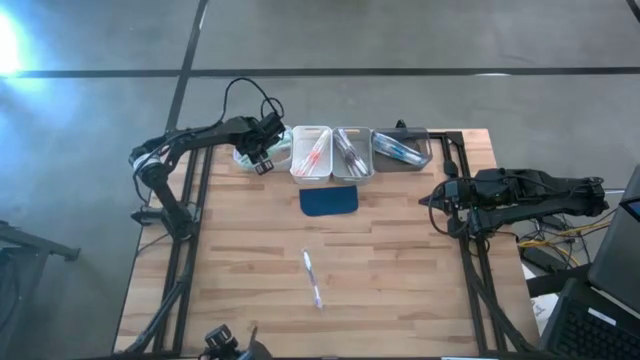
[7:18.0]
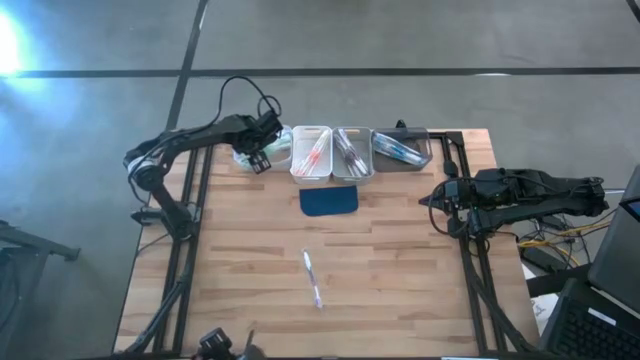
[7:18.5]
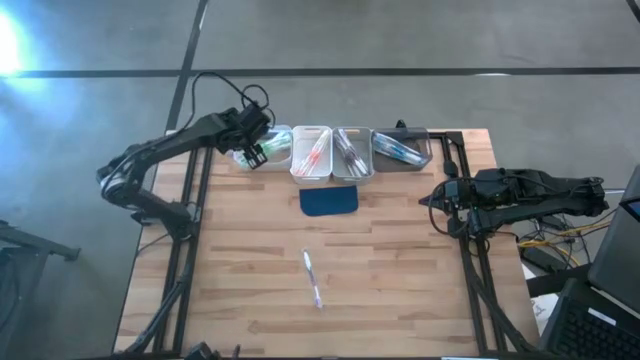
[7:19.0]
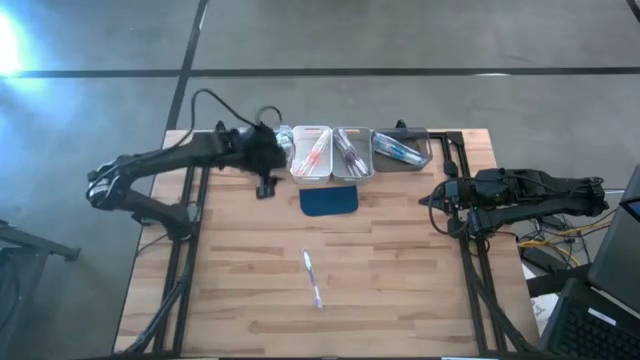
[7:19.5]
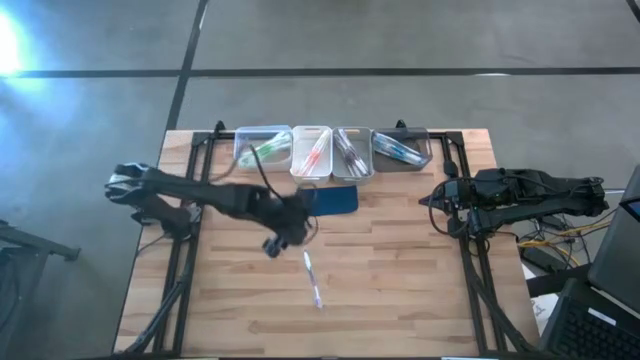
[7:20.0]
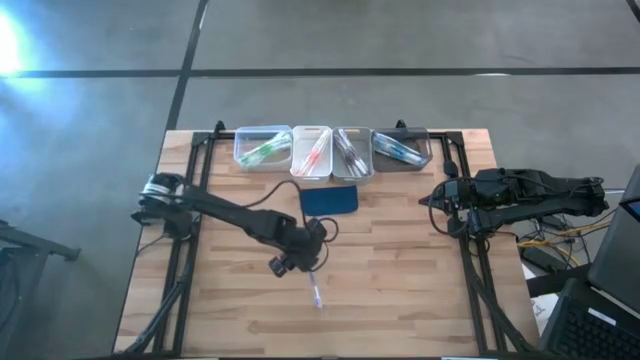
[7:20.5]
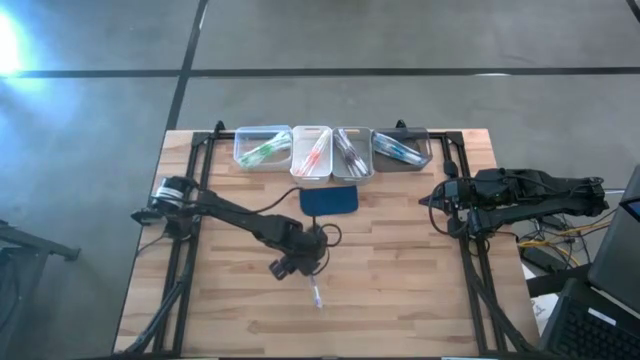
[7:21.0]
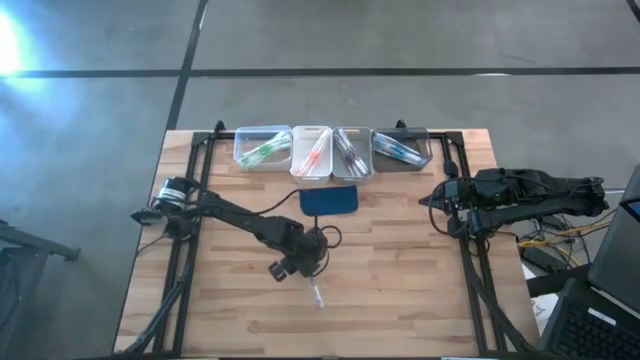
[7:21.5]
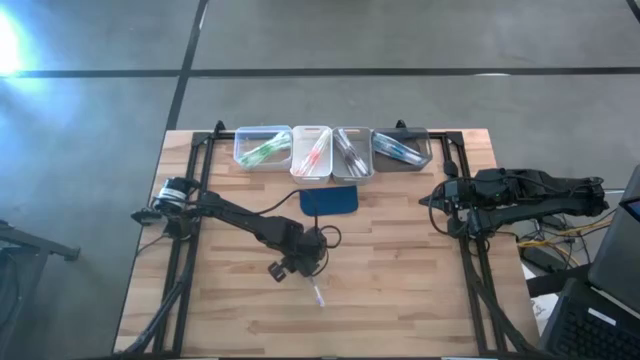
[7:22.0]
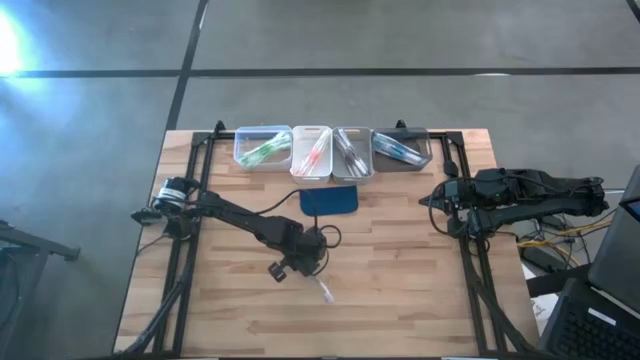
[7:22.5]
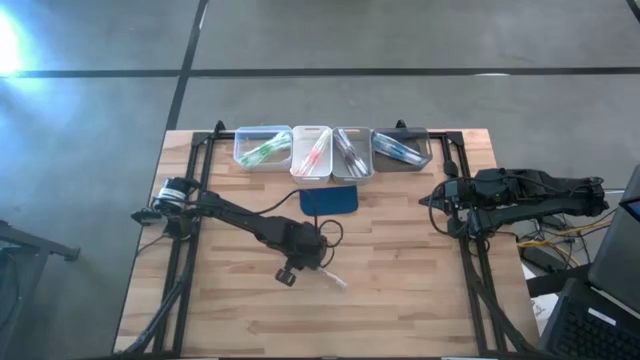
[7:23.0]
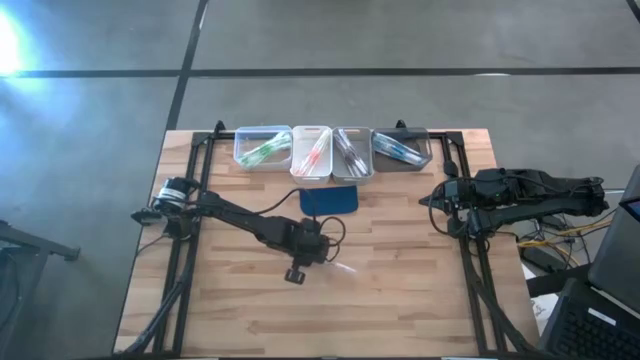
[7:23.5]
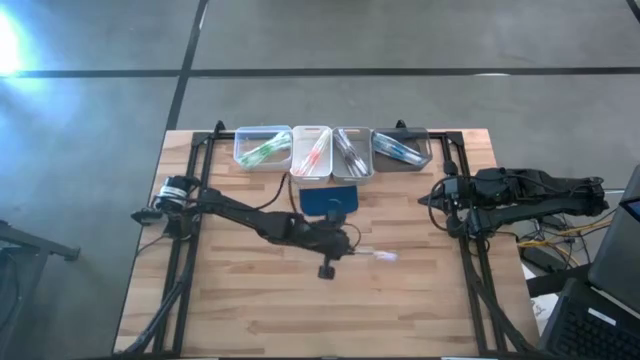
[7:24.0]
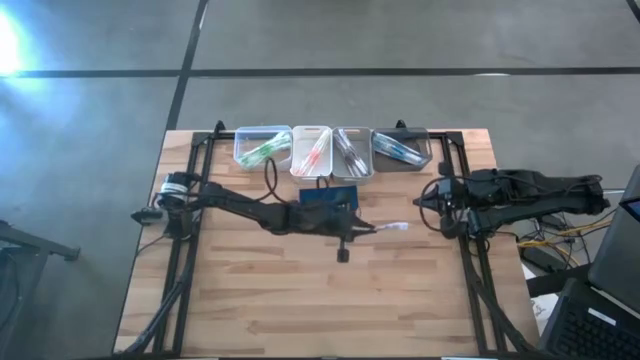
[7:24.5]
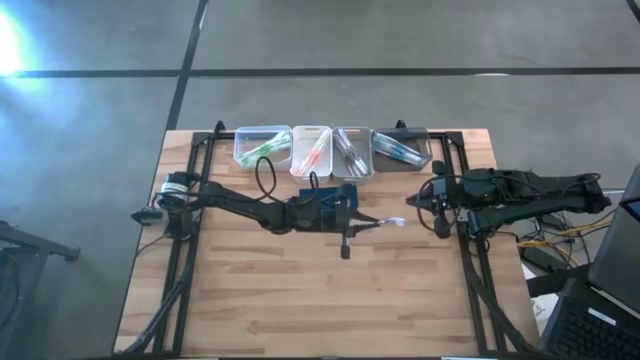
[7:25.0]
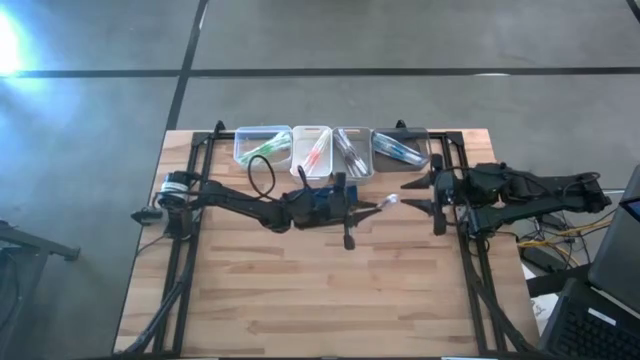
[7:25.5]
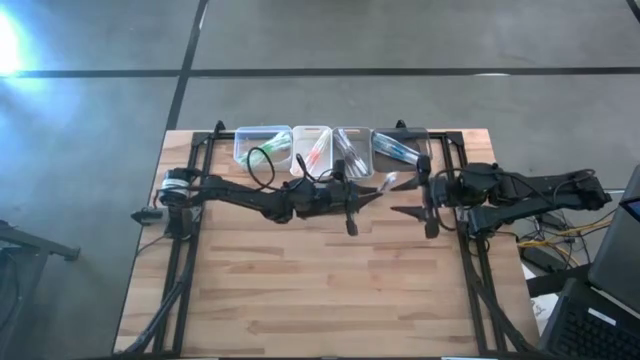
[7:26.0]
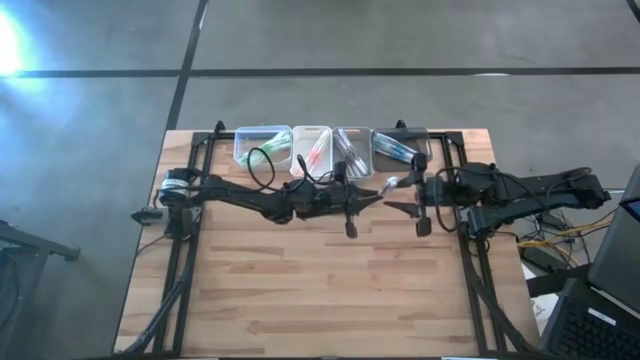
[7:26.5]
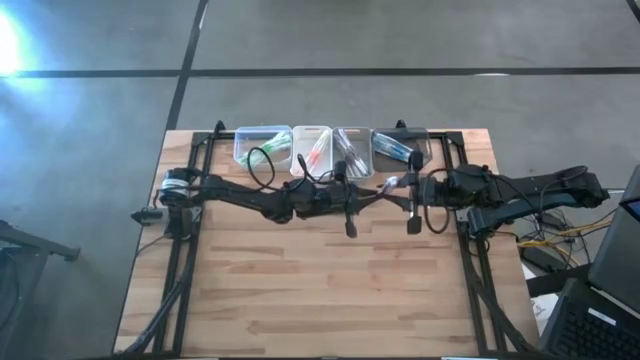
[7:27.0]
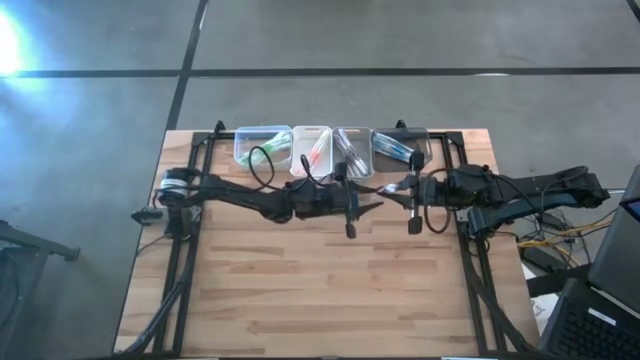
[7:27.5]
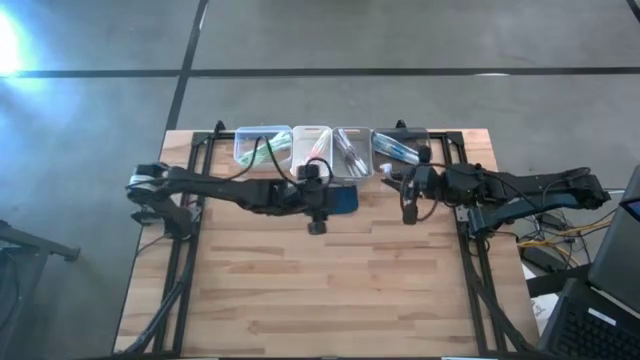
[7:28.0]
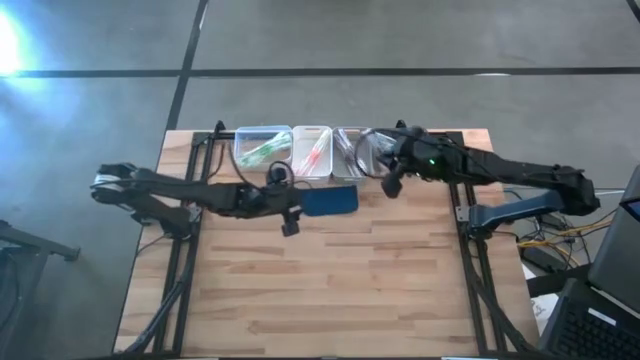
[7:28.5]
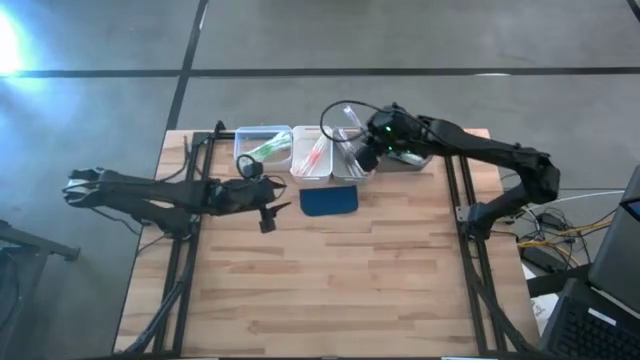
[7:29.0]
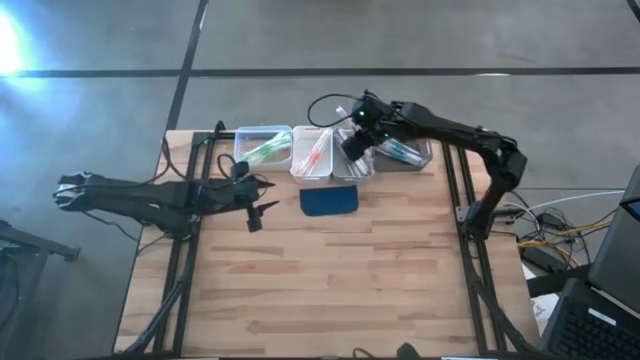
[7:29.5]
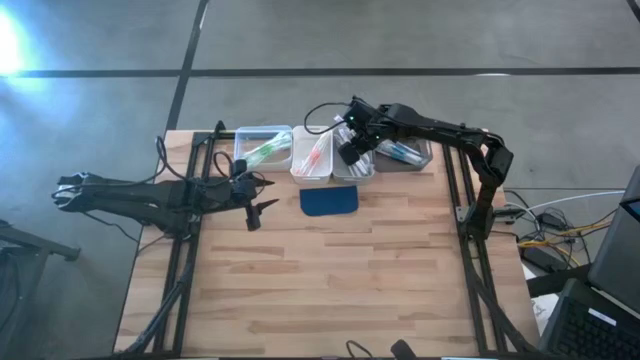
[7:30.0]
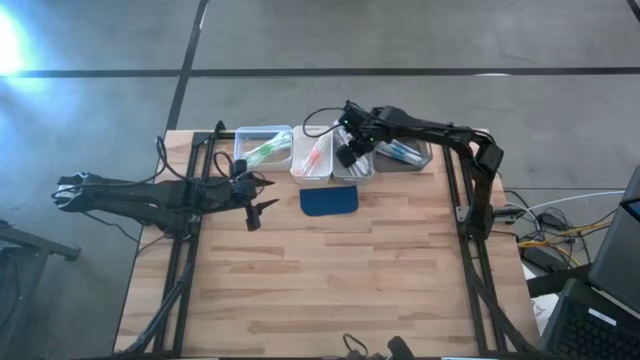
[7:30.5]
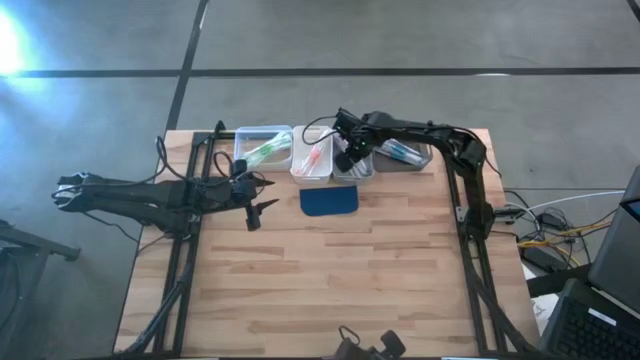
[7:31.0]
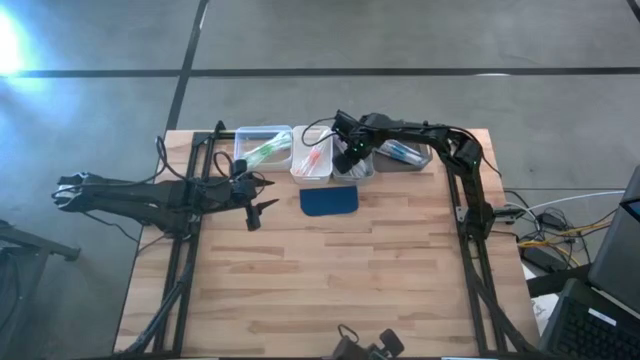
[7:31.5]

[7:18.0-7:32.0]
Task: Pick & Place Toothbrushes
Put the violet toothbrush into the gray bin

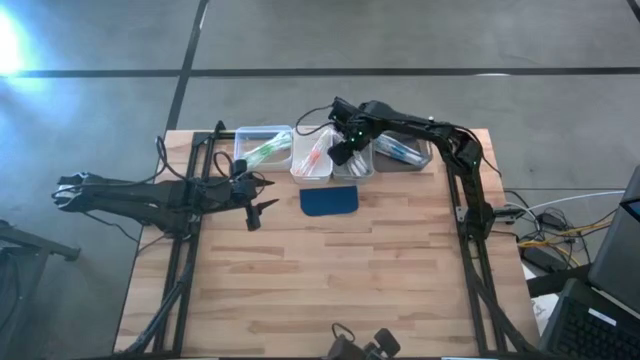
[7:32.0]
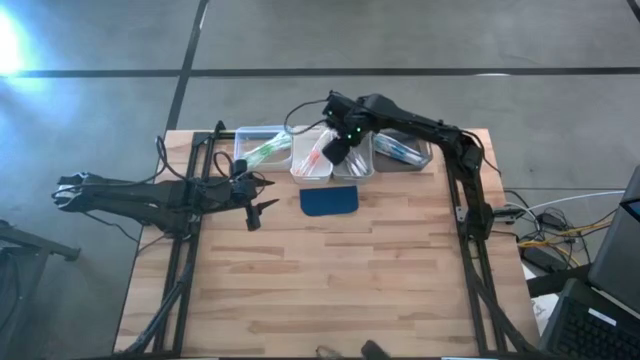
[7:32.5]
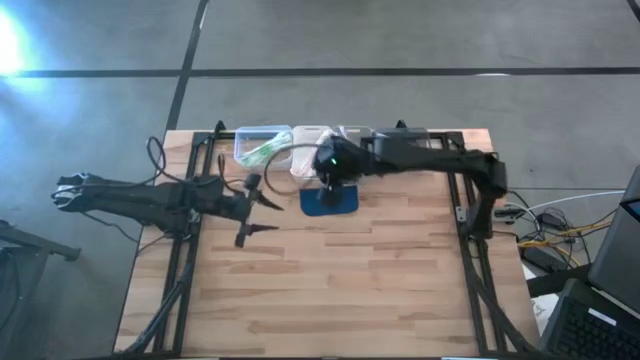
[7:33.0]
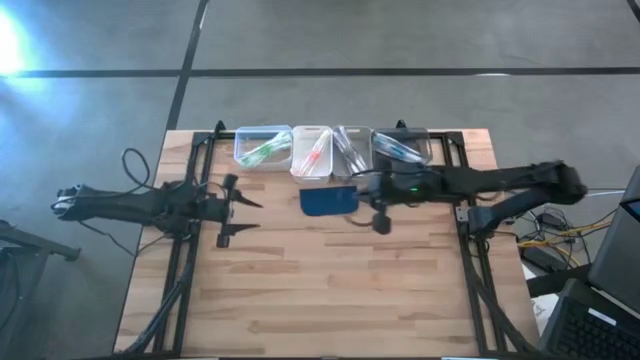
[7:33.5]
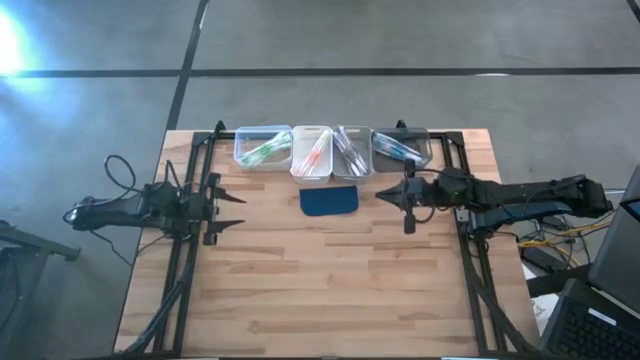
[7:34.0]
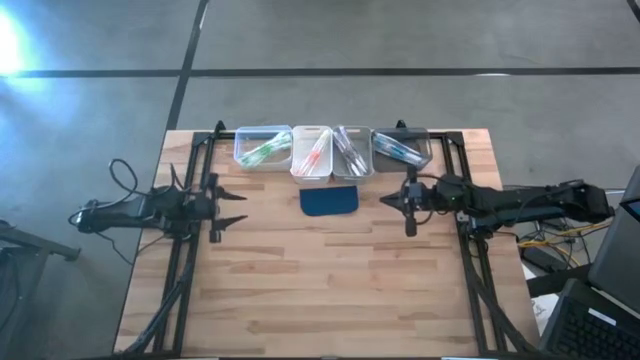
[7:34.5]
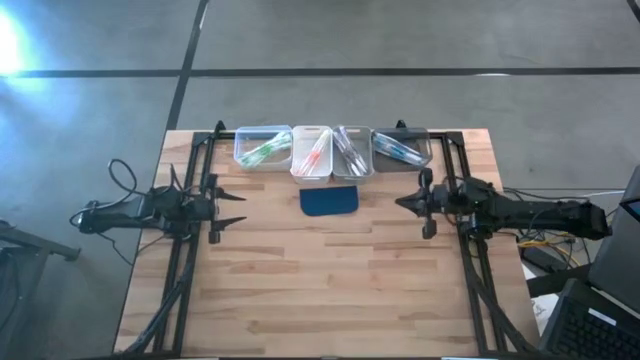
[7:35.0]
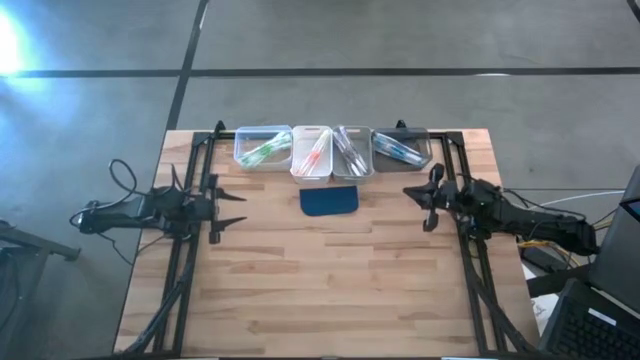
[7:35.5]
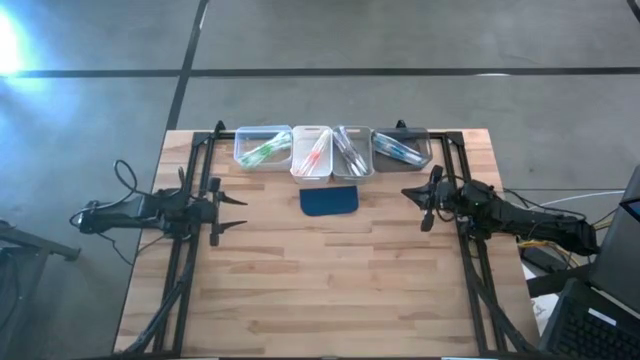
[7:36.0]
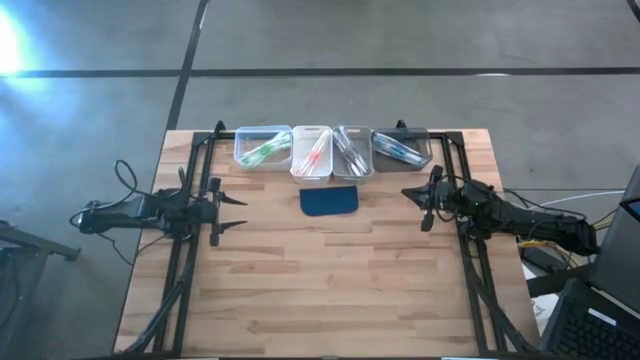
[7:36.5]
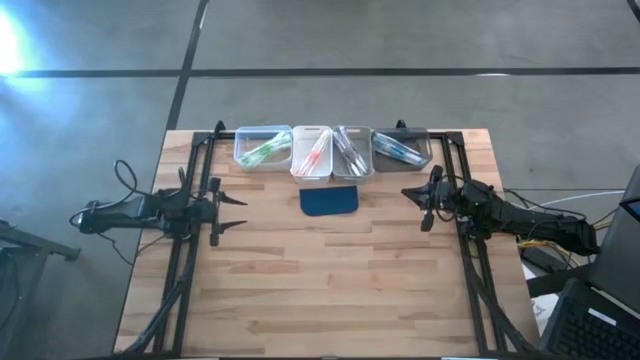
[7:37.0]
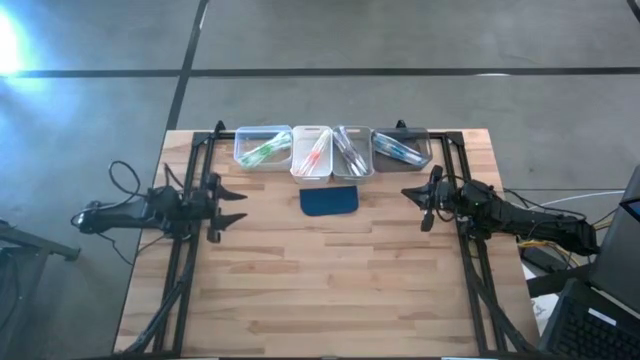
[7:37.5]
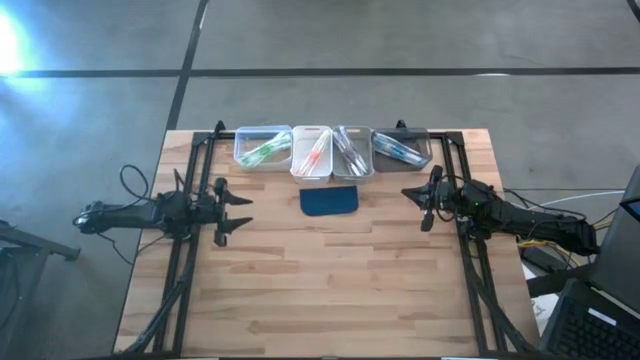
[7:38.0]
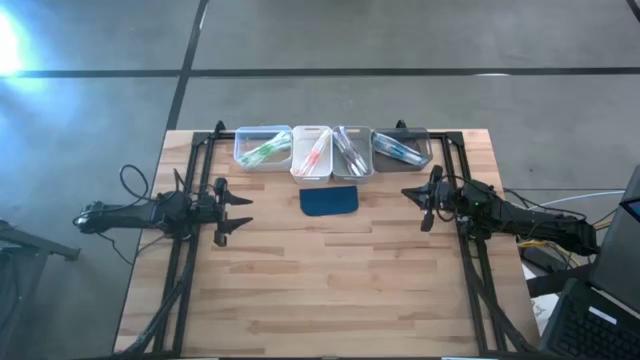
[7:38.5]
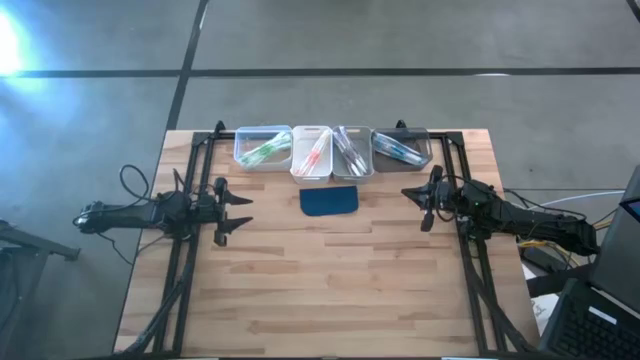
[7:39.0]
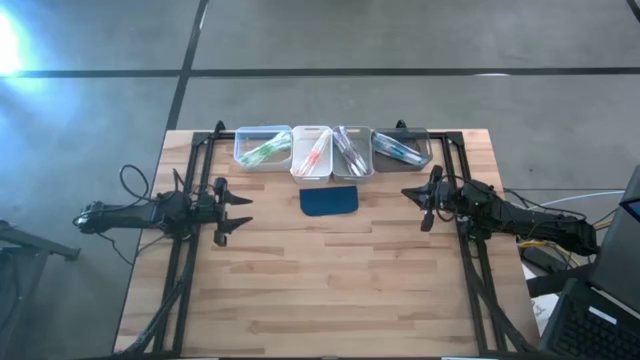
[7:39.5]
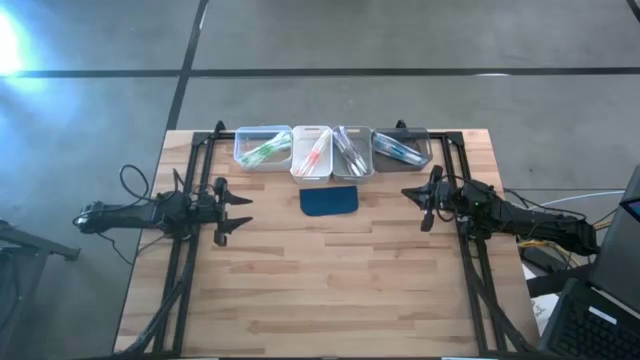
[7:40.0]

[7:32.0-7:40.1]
Return to Home Position
